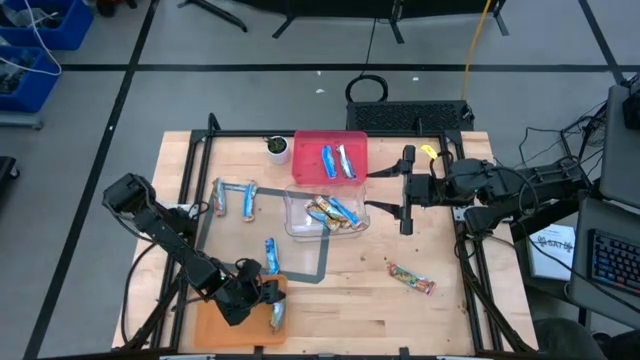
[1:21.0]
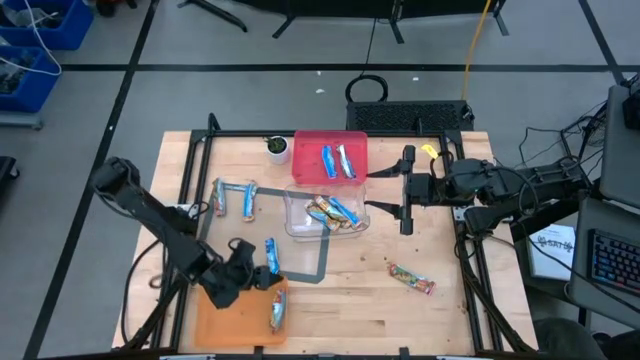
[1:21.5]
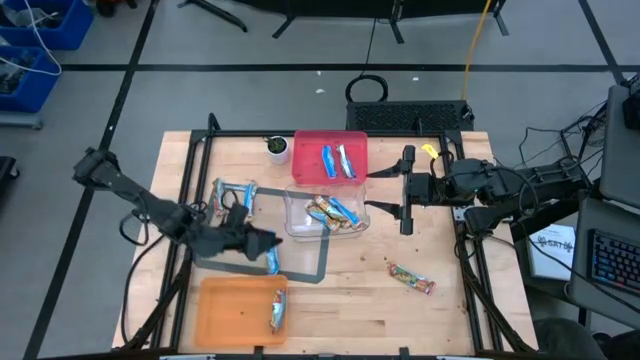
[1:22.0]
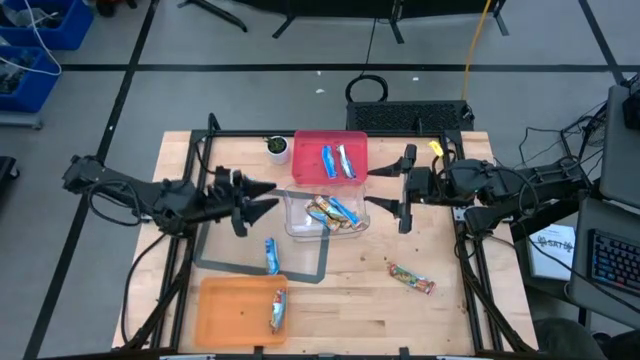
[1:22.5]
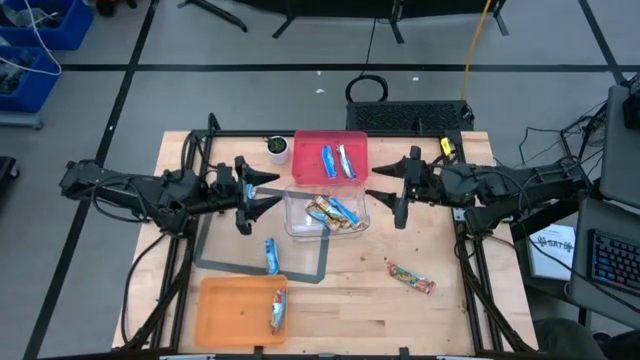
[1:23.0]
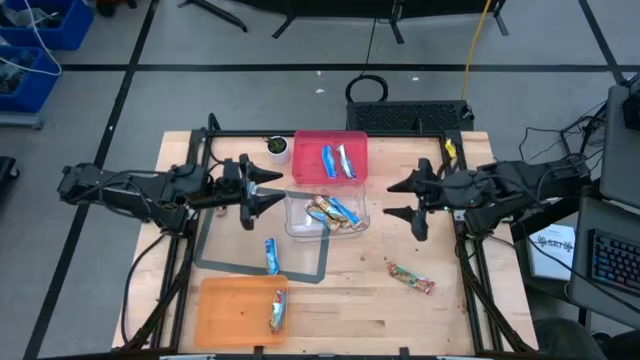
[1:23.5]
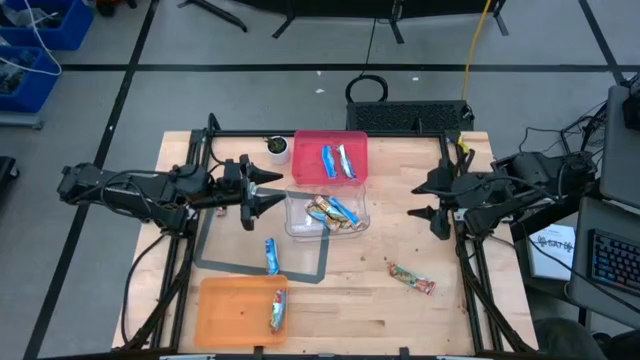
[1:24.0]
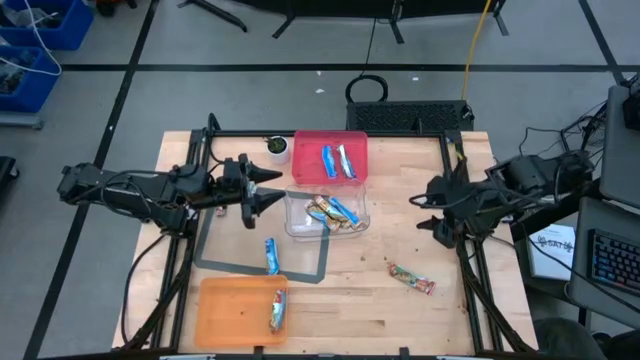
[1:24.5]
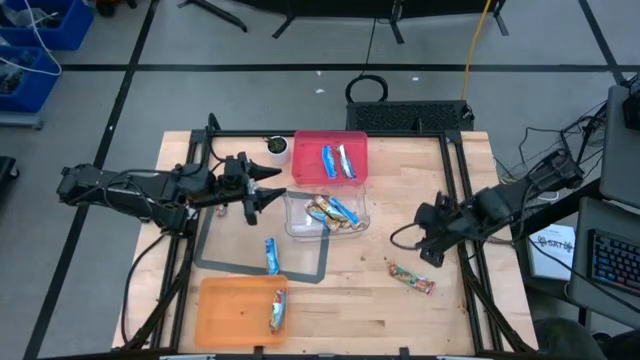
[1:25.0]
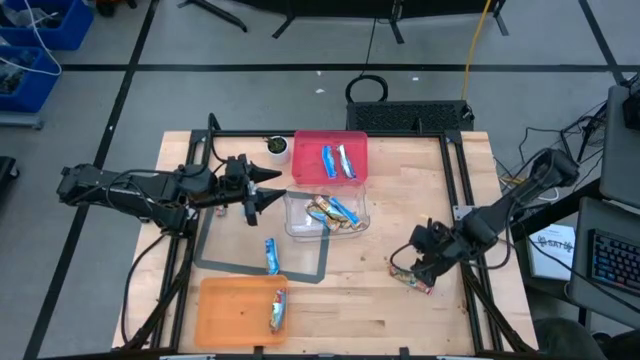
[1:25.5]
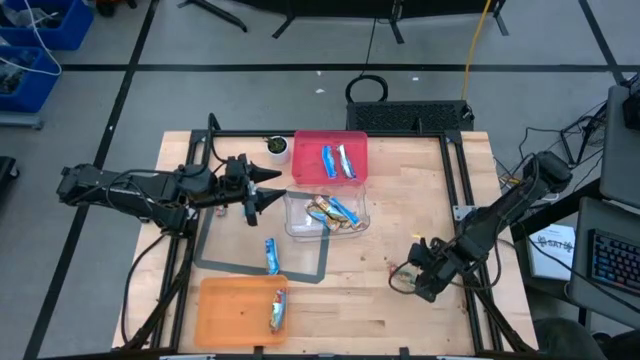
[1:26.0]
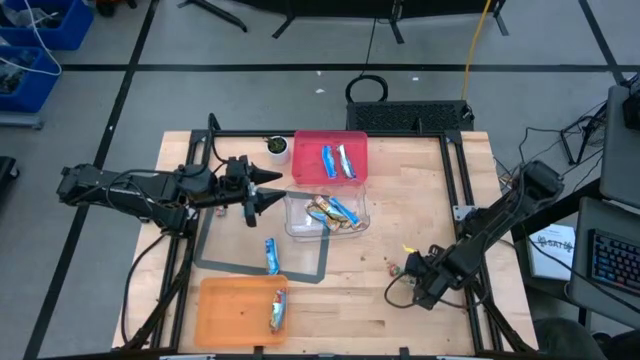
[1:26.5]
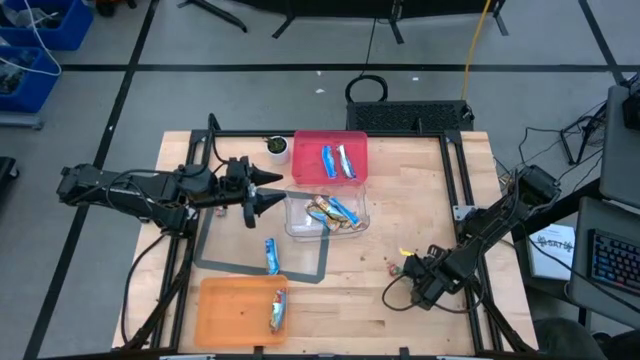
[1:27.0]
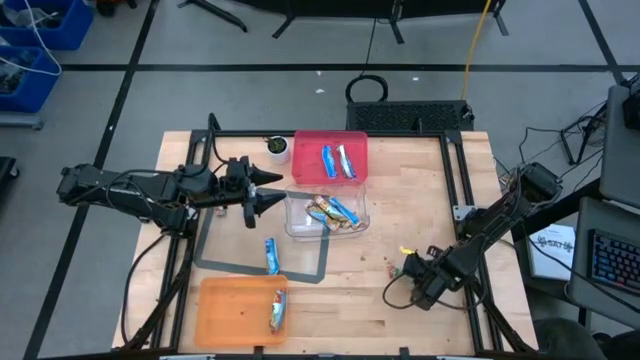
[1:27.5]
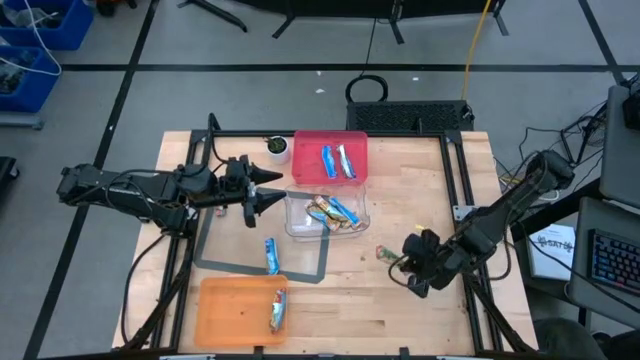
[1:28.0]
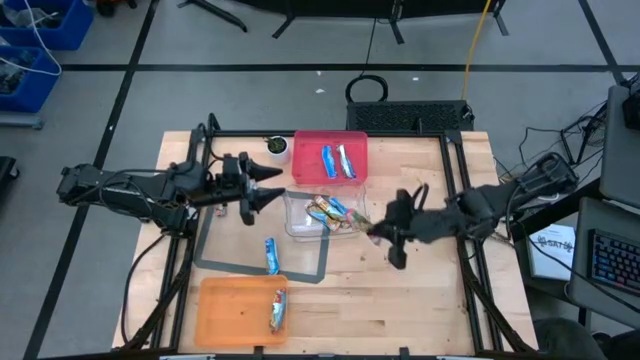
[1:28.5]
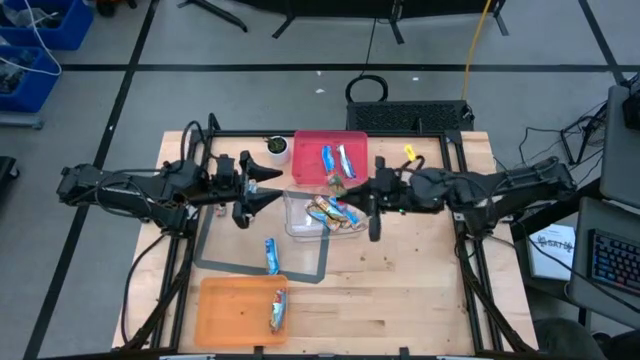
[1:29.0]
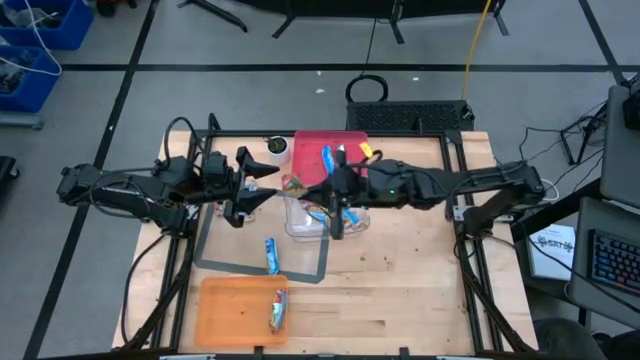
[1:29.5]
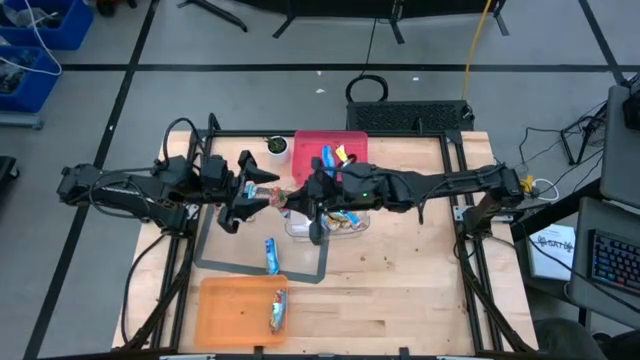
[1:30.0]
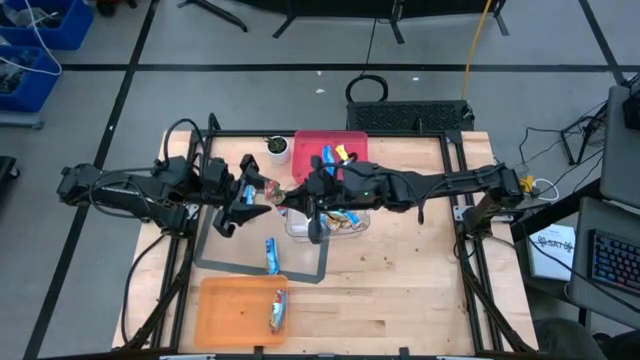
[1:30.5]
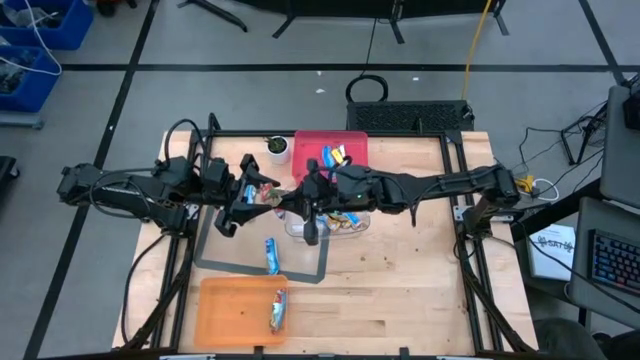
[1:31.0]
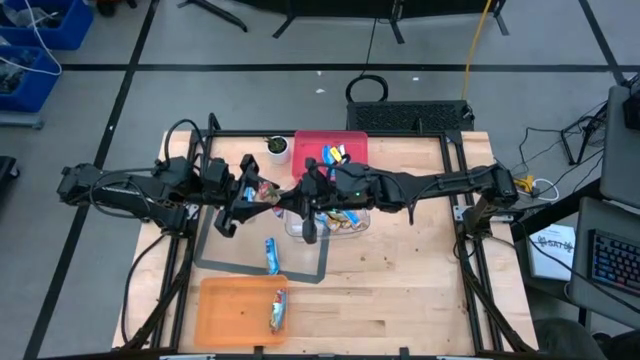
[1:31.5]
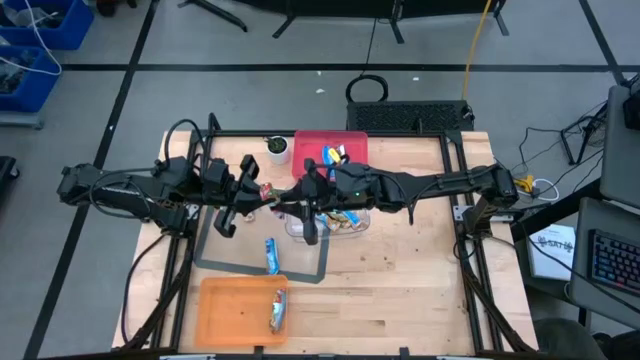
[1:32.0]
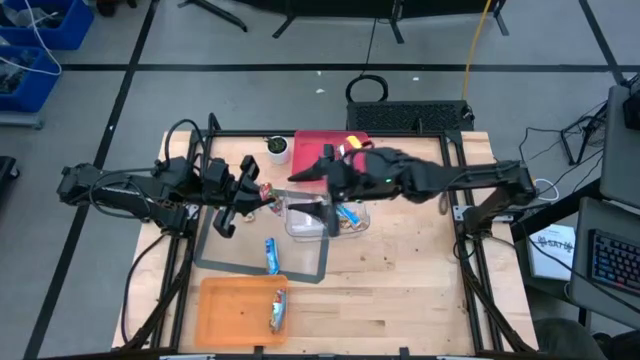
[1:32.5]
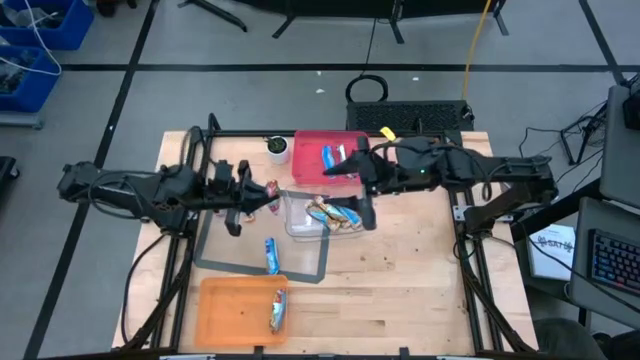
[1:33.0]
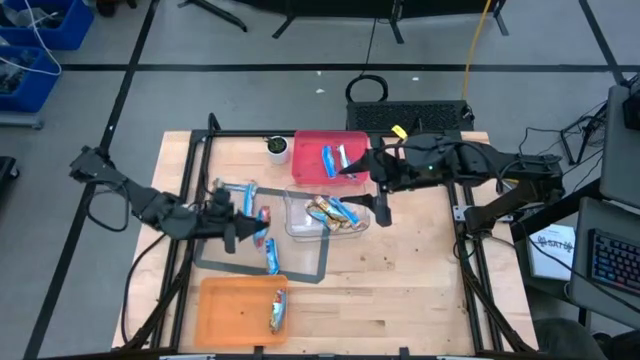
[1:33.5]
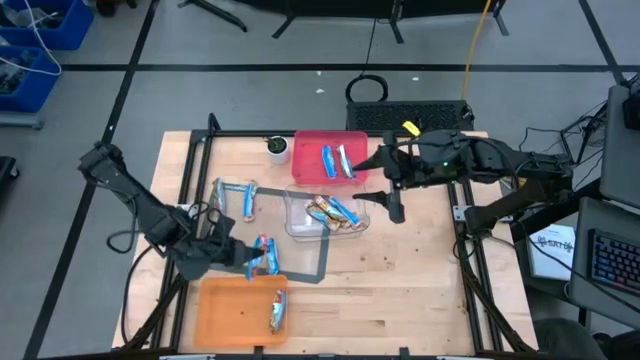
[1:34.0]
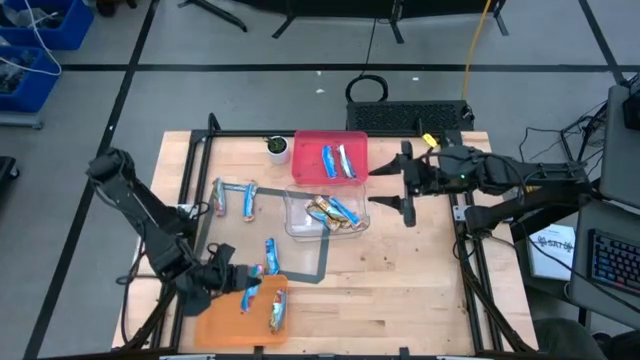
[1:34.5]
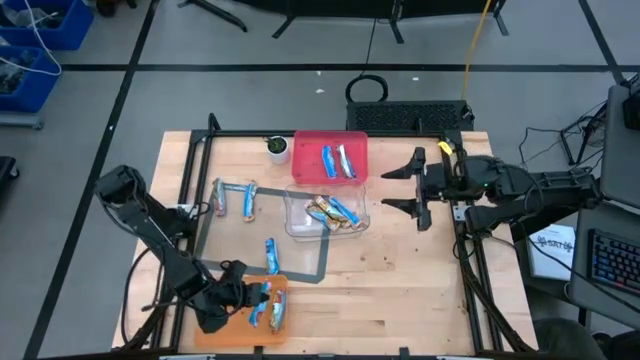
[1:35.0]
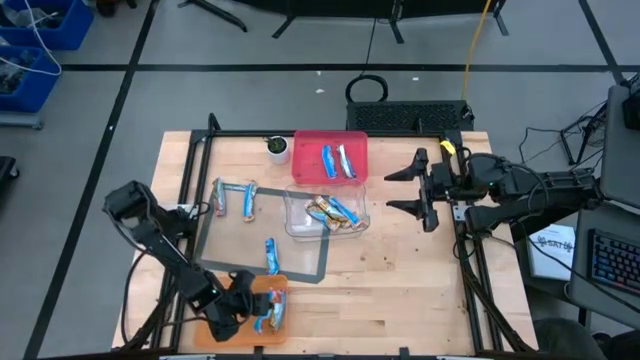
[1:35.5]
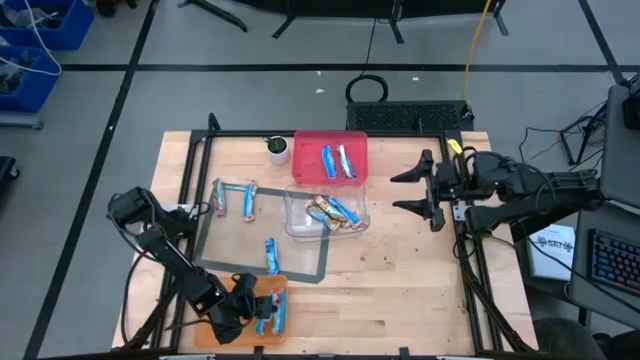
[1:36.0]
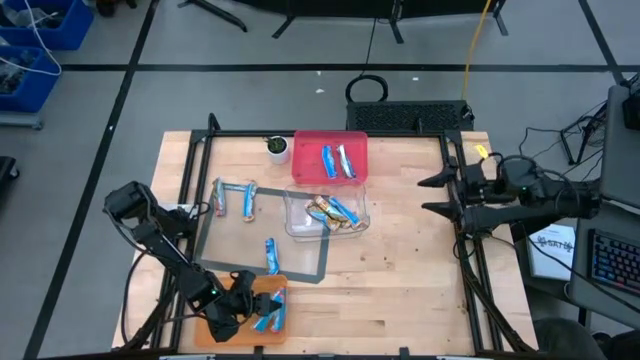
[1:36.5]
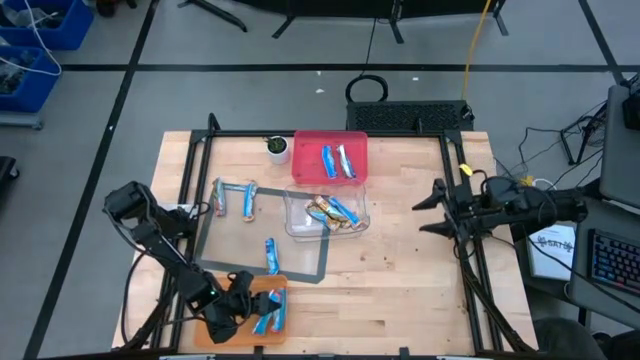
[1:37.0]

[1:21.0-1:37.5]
Task: Pick and place Granola Bars by type
Put the right red granola bar into the orange bin

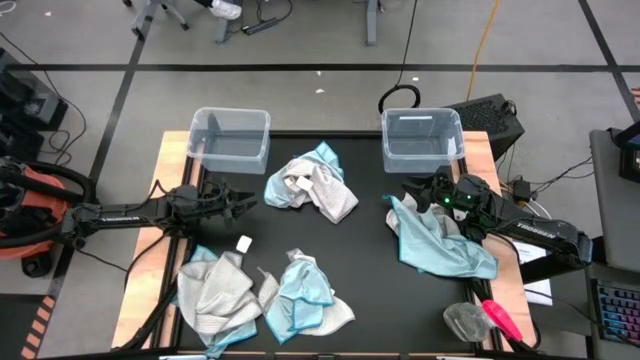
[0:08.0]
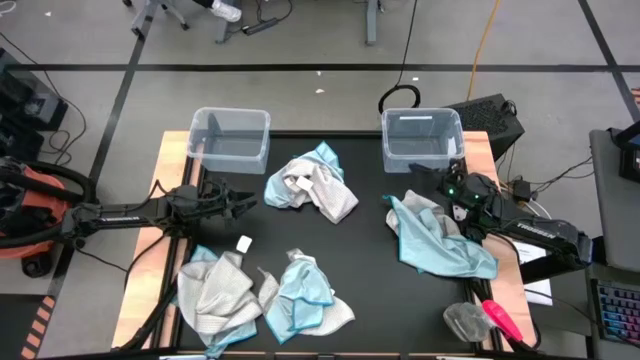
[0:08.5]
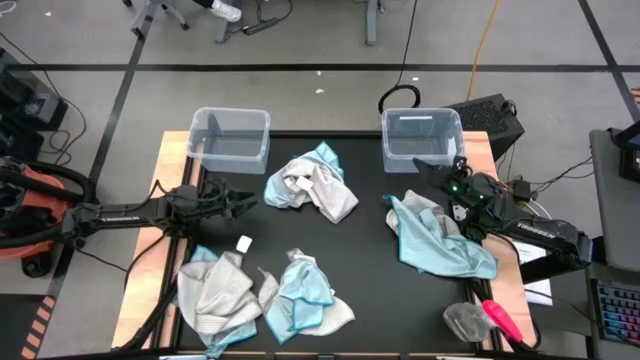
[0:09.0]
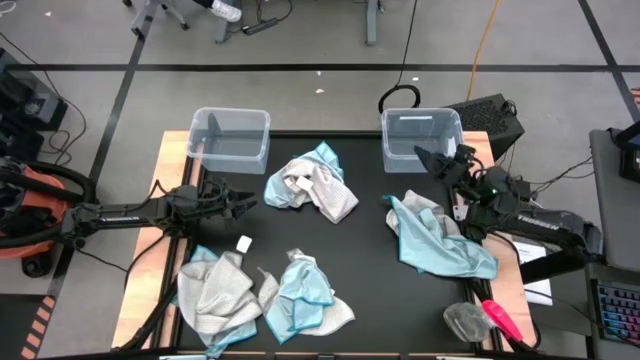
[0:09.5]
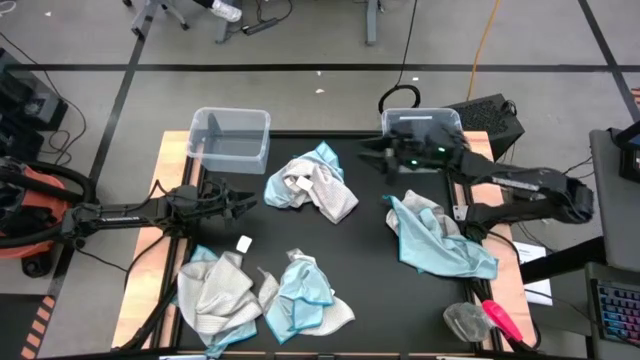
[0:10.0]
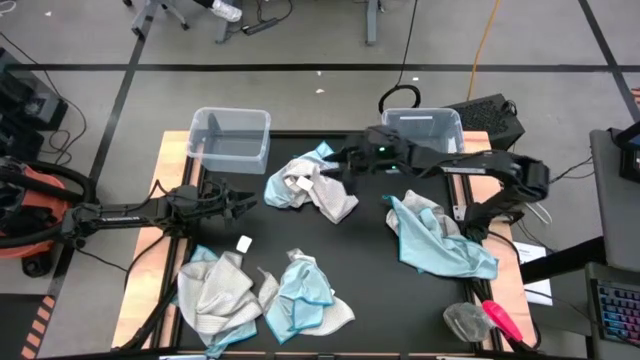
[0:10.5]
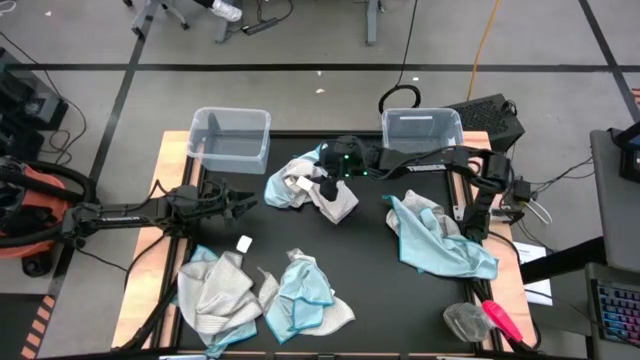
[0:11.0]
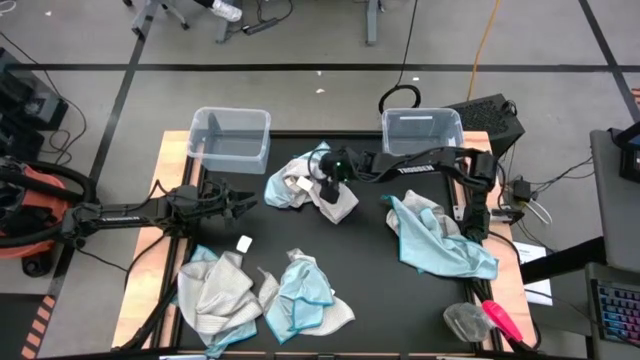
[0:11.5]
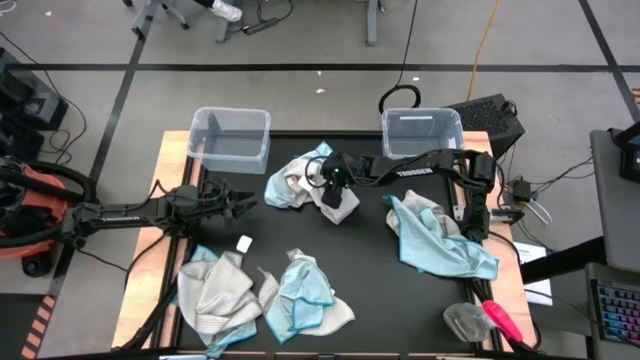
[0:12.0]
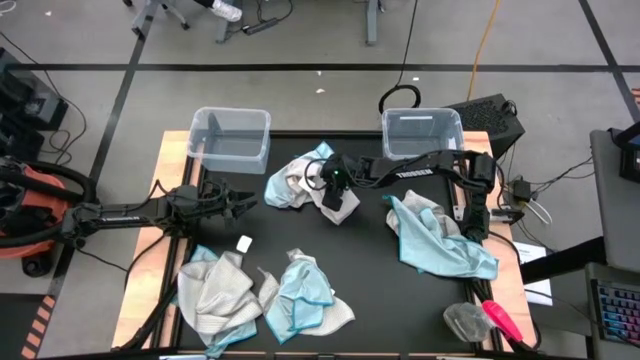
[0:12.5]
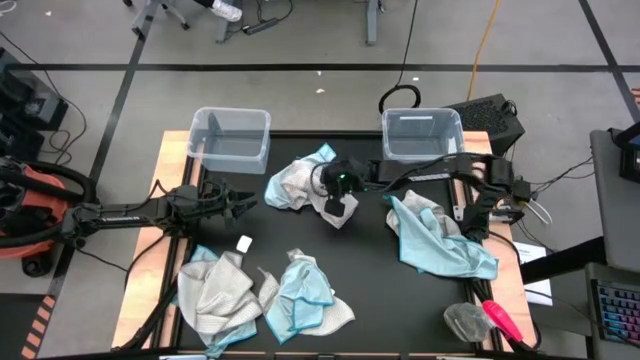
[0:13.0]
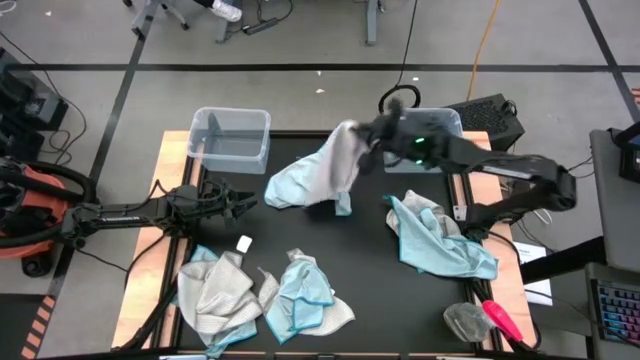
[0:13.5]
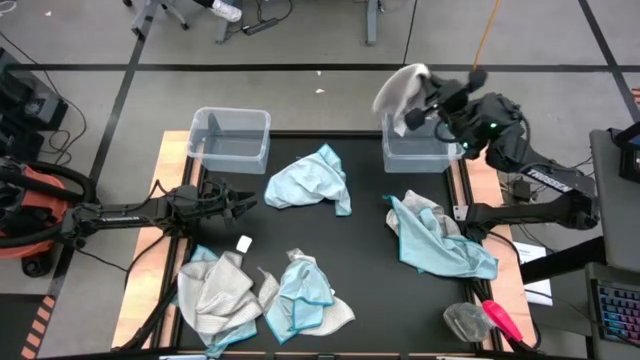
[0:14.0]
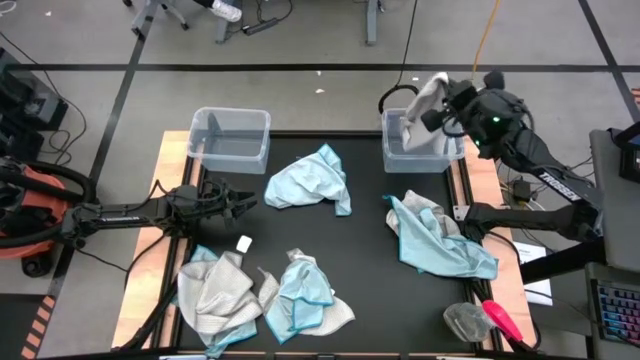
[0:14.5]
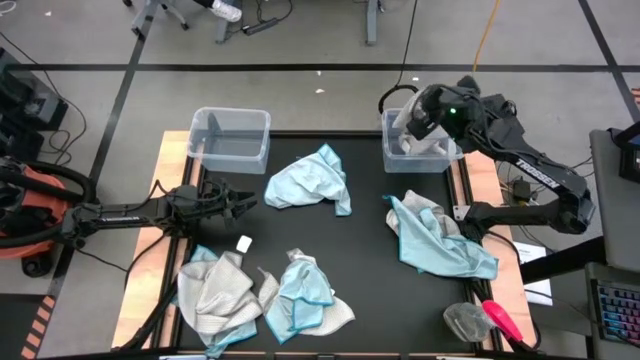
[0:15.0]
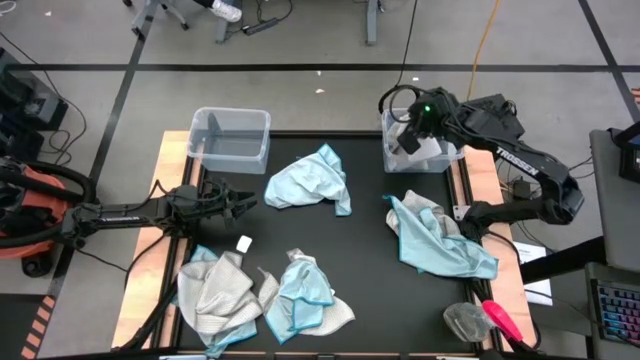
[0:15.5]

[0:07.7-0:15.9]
Task: Sort microfiber towel by color & place in baskets
Put the gray towel into the right transparent bin
